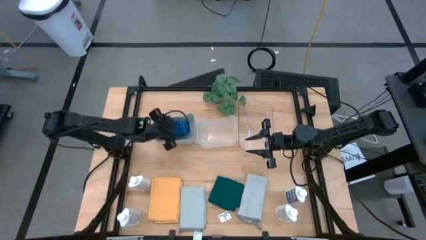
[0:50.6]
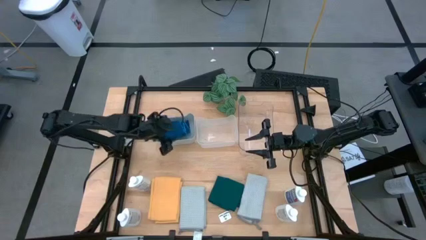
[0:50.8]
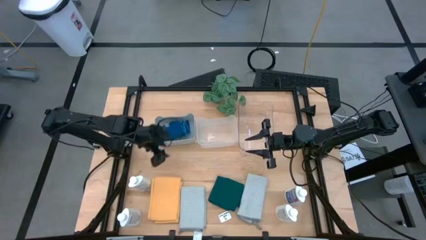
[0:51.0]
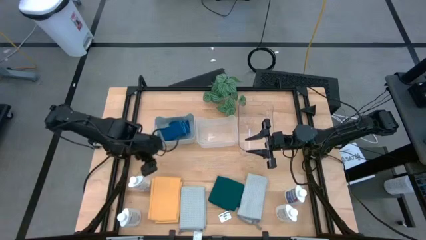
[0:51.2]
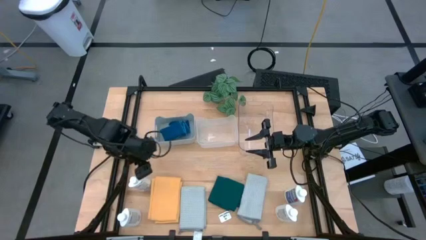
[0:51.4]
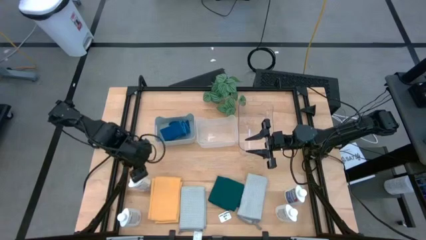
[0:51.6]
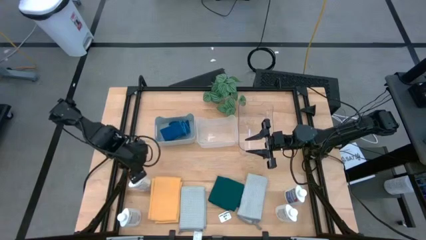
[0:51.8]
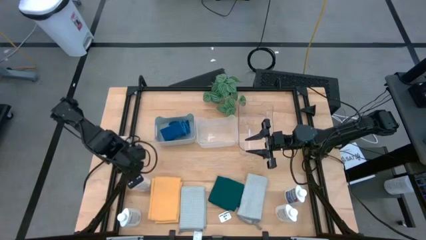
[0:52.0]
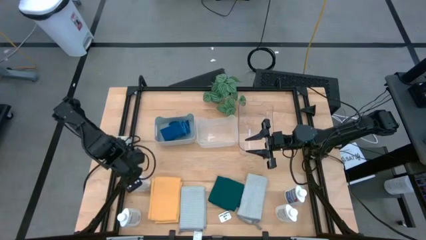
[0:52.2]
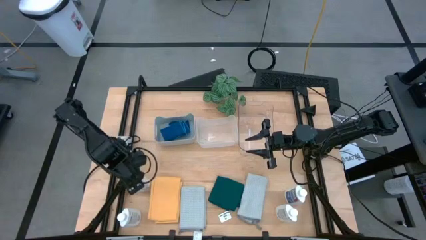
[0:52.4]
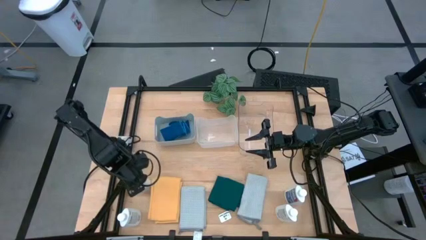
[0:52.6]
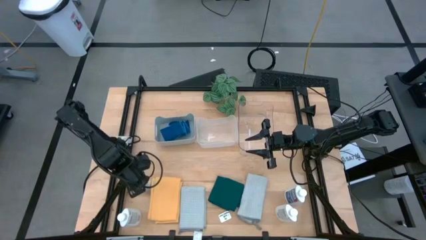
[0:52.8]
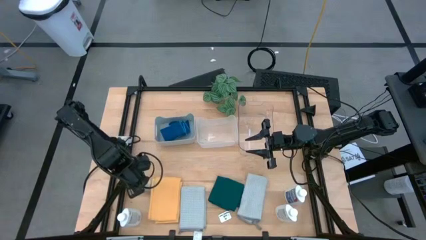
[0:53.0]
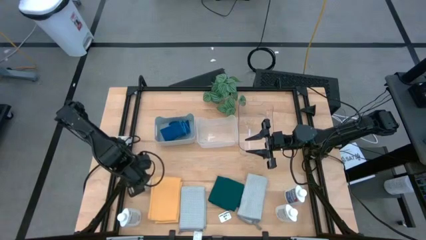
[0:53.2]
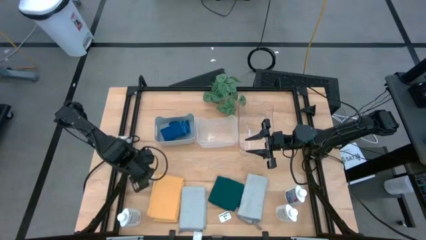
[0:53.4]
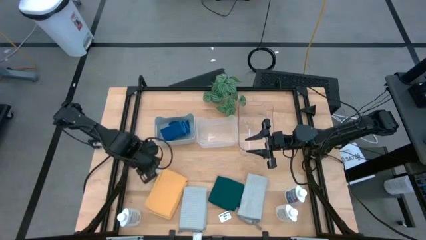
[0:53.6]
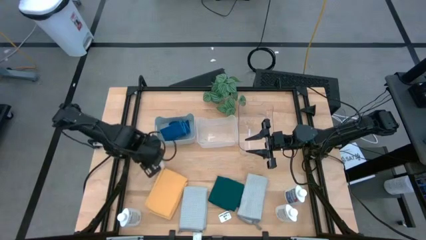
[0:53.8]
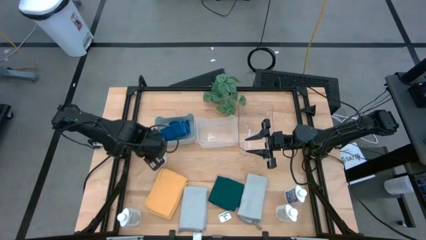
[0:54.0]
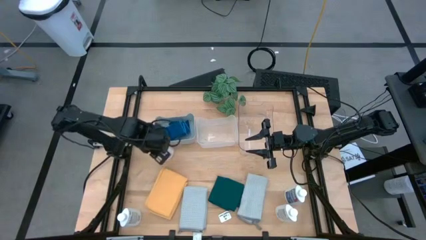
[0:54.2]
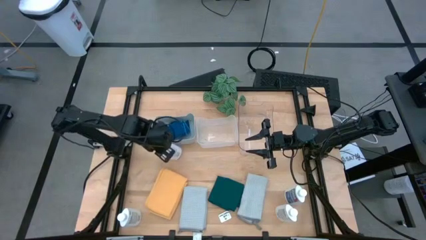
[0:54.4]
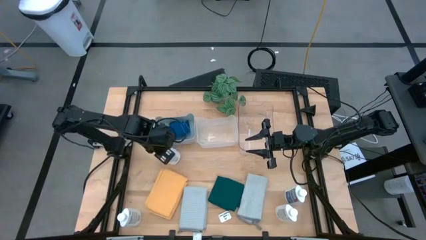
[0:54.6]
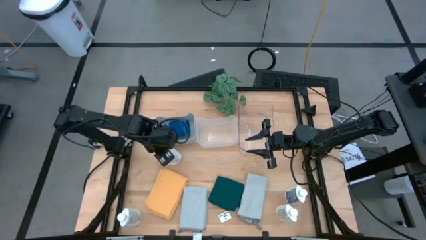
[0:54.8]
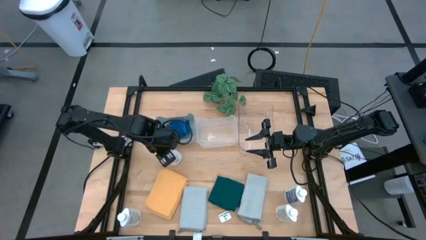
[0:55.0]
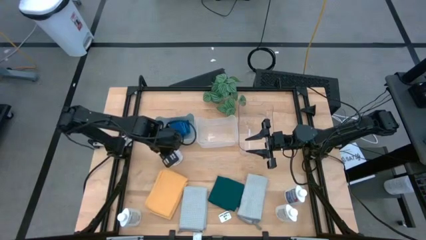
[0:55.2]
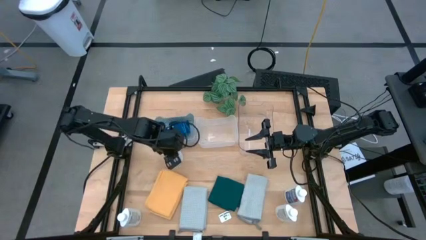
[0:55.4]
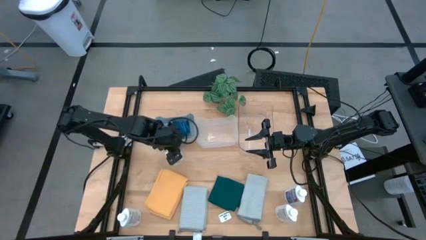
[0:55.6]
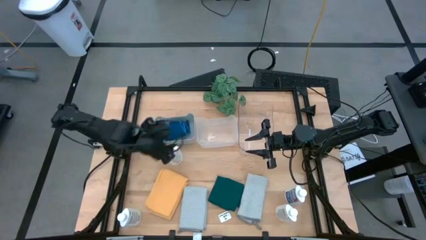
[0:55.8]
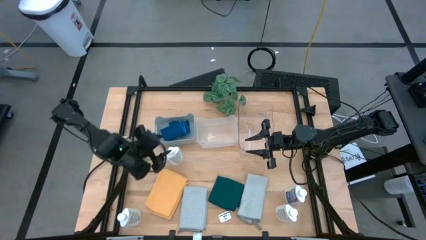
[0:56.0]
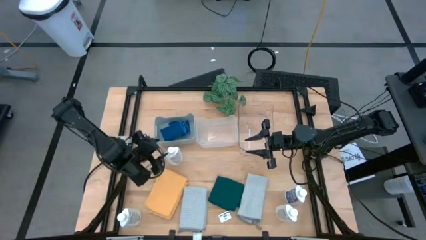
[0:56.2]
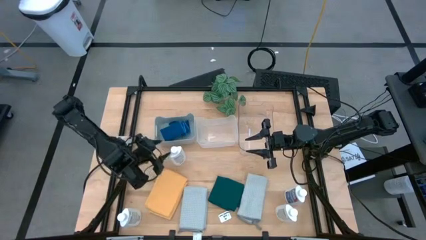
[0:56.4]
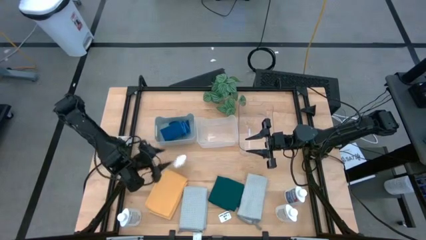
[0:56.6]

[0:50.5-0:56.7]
Task: Pick & Place Kitchen Items
Put the white plastic restorer bottle into the white bin

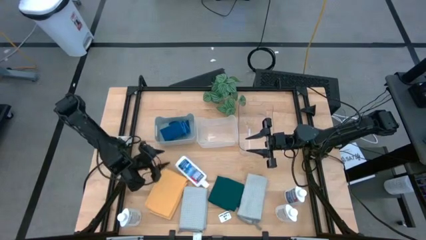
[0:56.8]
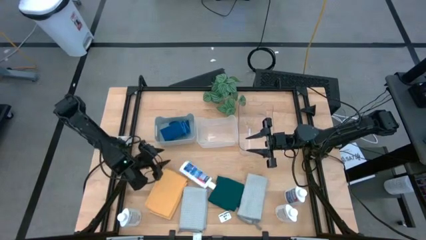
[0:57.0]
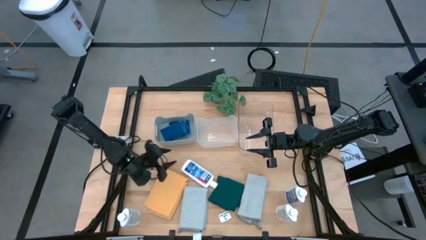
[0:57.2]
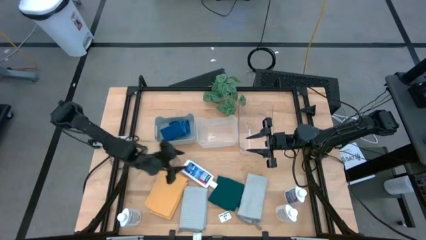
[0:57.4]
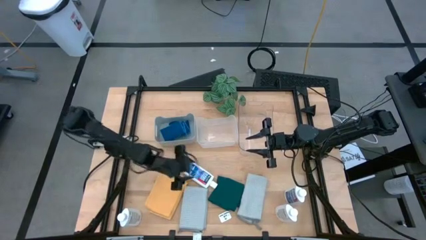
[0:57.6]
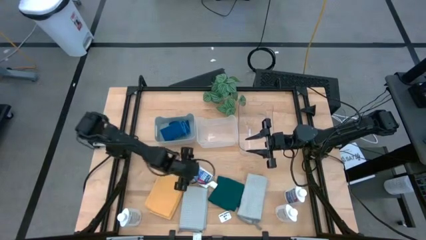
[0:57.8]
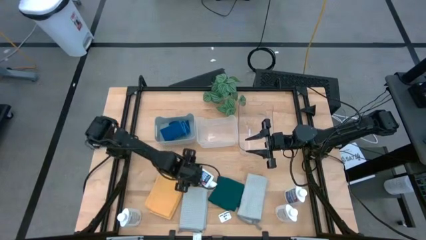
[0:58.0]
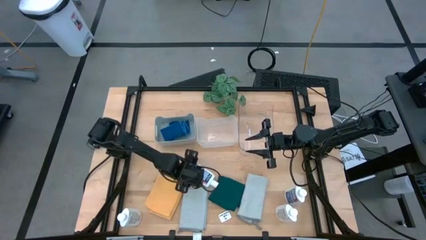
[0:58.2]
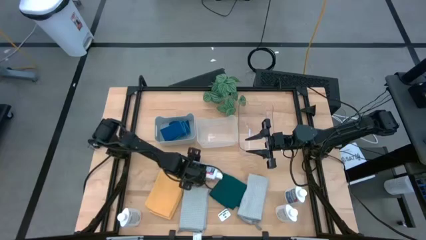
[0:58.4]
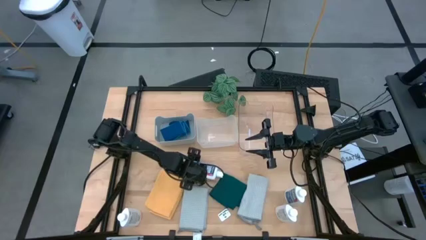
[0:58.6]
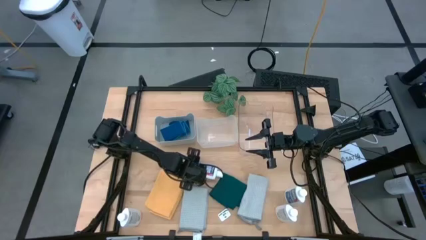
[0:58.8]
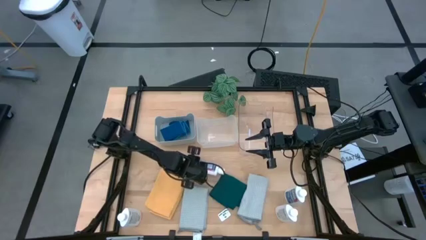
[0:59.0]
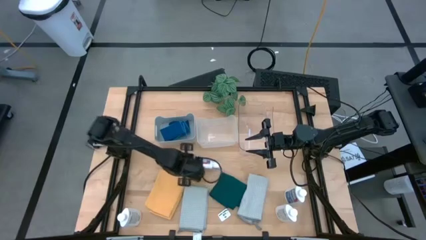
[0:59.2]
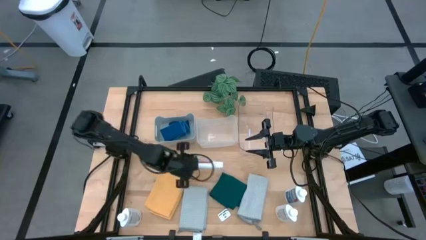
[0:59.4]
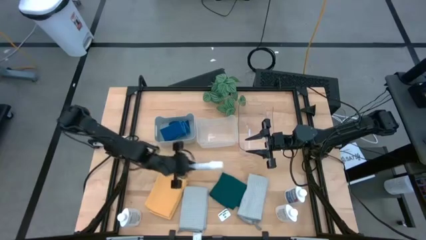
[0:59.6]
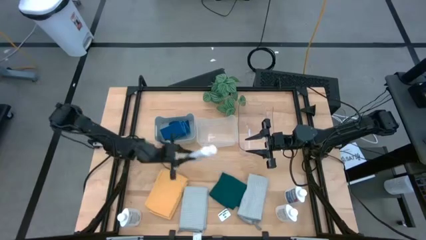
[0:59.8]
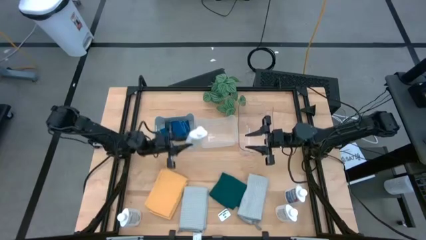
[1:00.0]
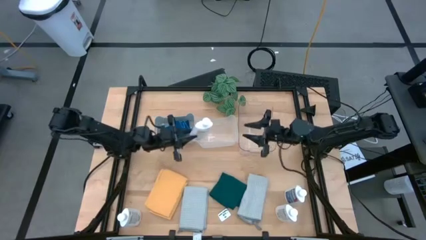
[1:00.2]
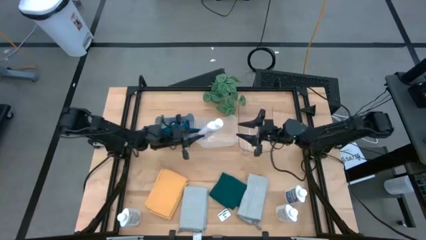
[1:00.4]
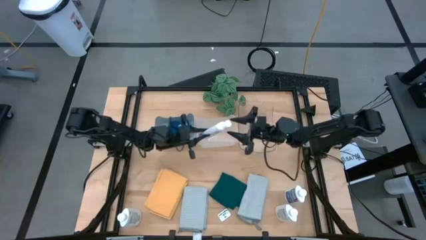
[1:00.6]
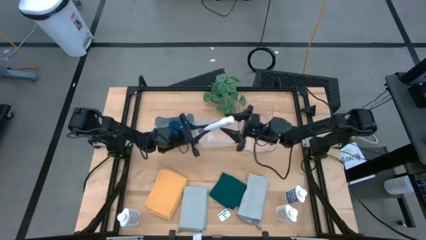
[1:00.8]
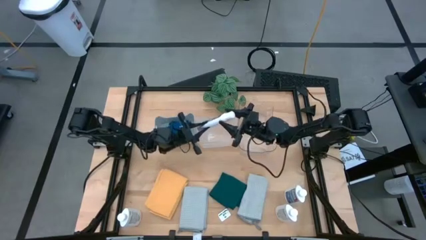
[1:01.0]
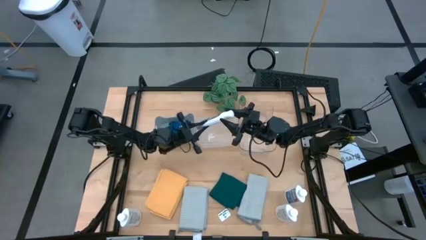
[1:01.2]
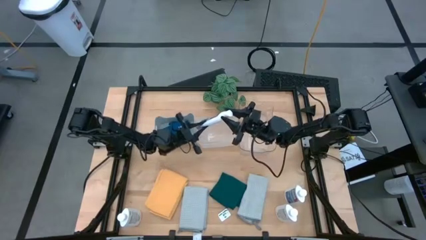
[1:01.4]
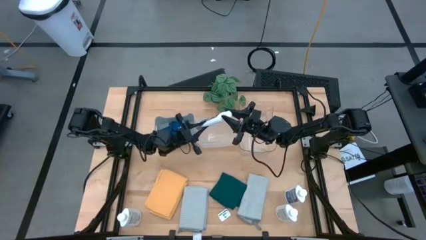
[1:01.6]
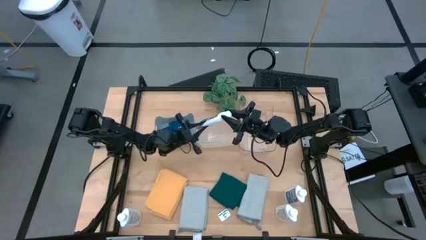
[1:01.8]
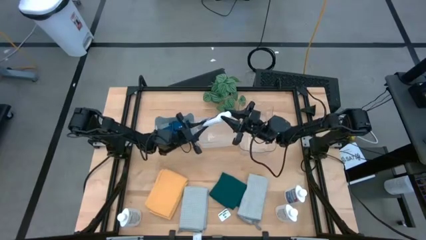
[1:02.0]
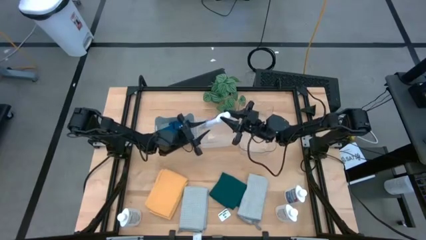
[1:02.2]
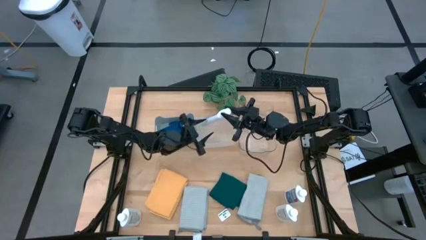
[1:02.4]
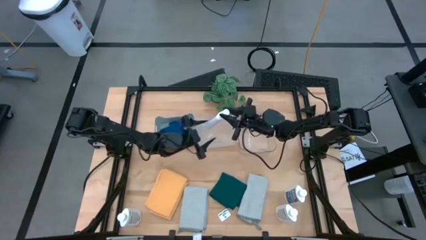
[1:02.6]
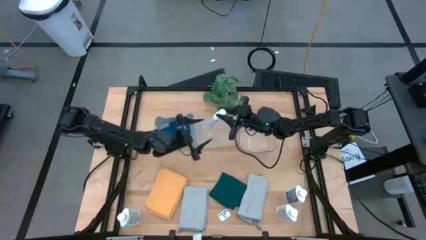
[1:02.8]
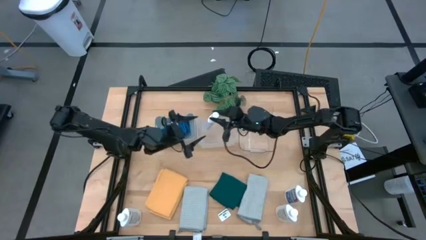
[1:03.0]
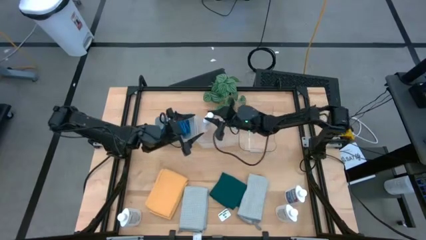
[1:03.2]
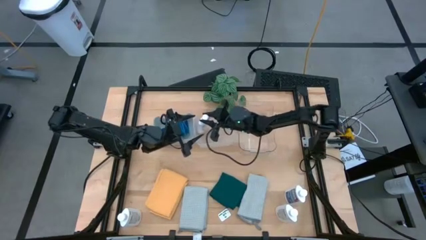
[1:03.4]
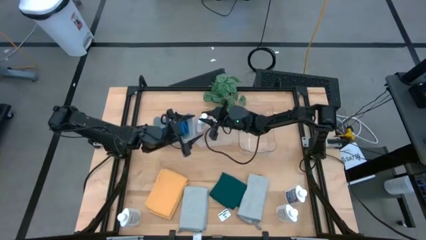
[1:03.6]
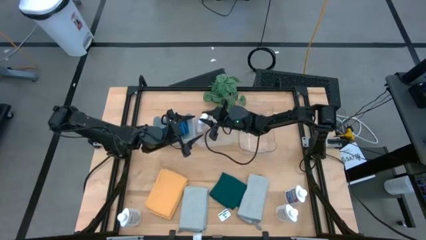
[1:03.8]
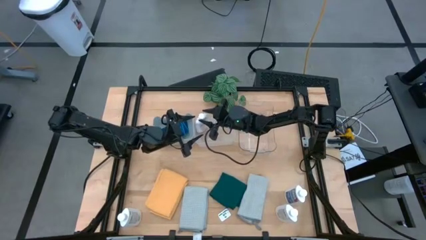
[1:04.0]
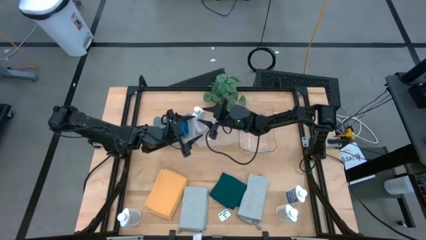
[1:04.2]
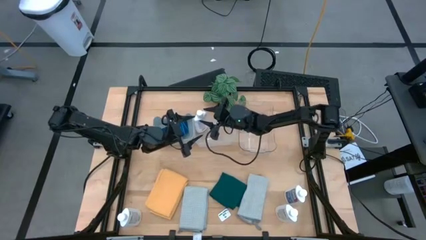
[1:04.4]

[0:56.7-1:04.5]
Put the white plastic restorer bottle into the white bin

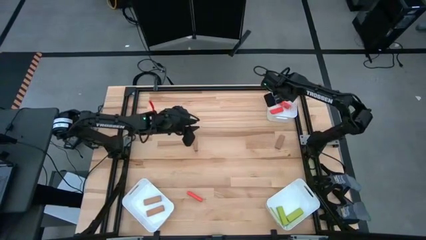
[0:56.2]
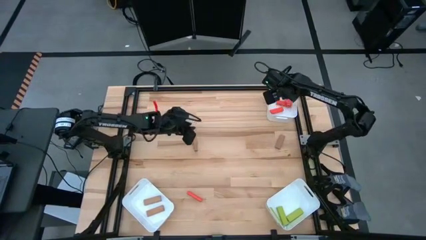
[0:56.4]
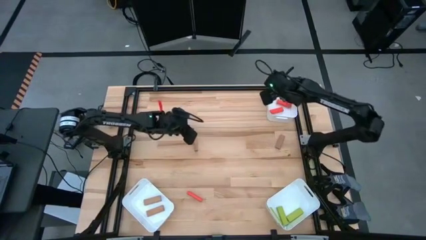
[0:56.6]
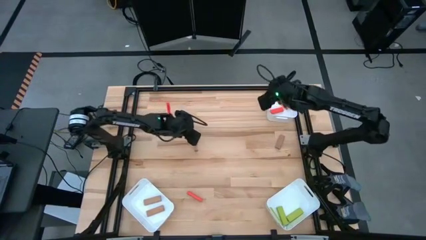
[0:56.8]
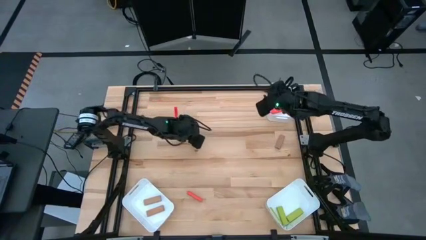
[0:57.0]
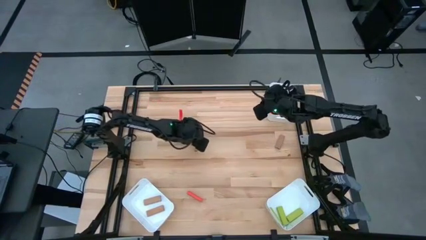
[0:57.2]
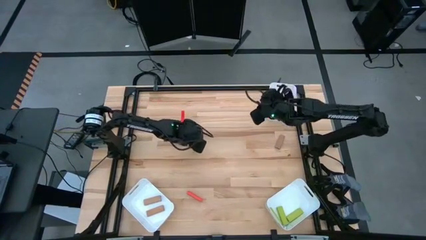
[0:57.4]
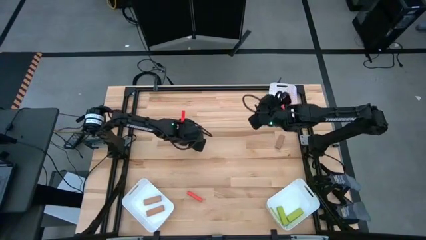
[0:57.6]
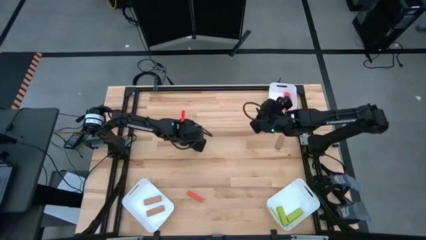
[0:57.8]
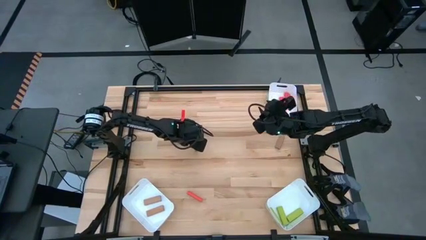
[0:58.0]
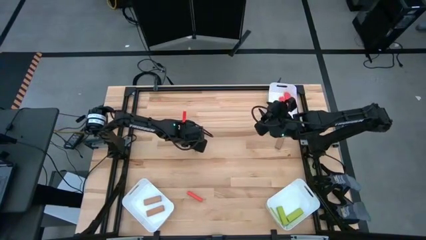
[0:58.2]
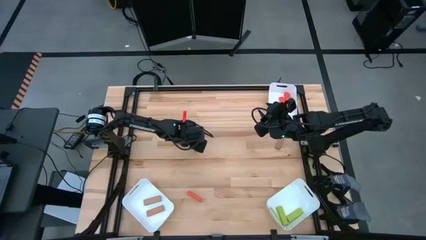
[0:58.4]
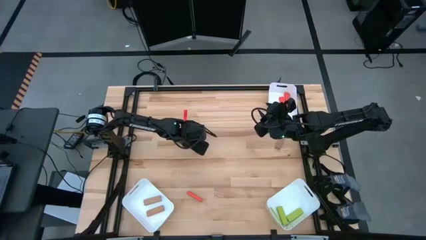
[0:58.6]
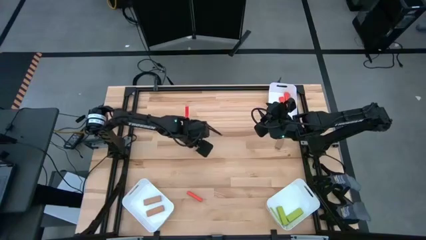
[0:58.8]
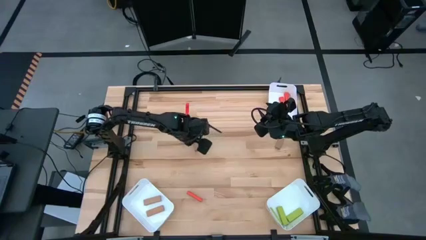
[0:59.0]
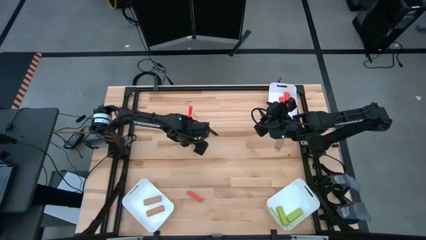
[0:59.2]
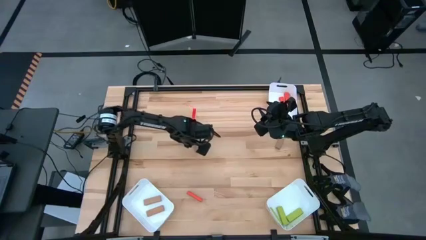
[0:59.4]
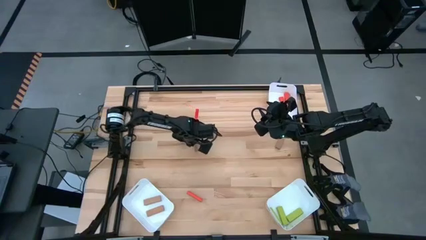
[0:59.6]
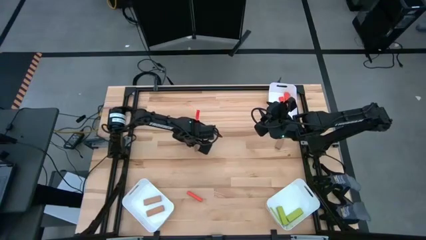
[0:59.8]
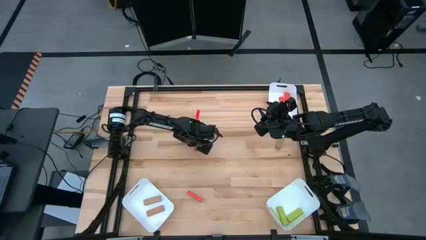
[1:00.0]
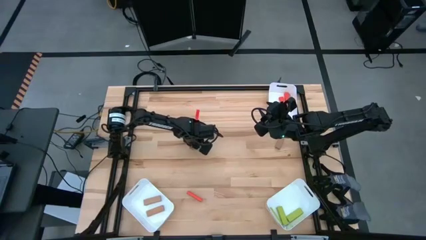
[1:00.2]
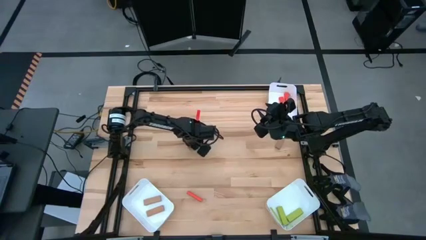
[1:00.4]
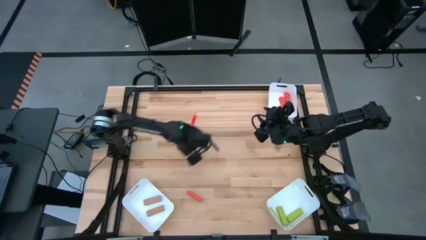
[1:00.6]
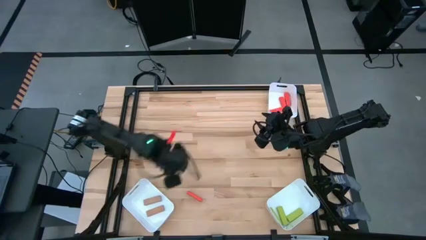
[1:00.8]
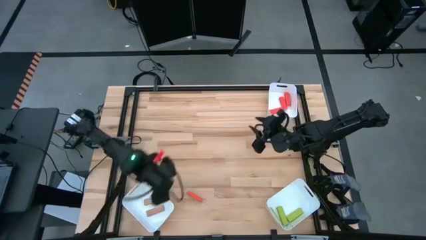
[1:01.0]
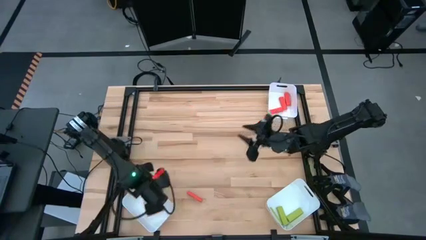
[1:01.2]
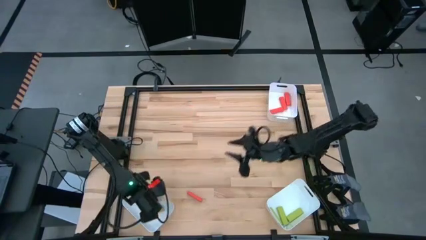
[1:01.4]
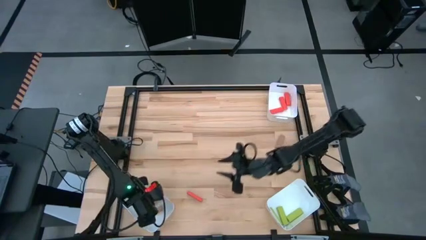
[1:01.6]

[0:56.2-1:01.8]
Task: Sort blocks
Put the left brown block into the bottom left bin
